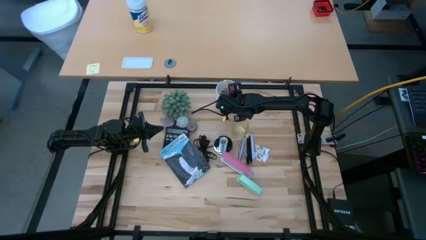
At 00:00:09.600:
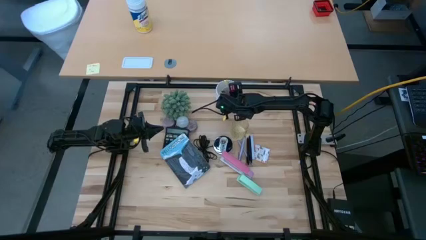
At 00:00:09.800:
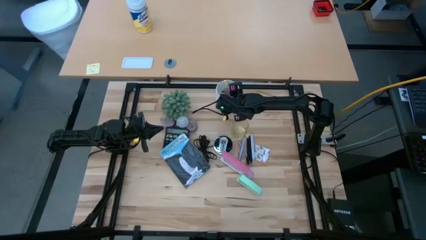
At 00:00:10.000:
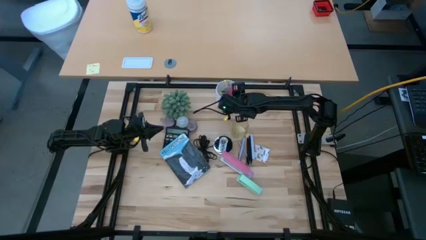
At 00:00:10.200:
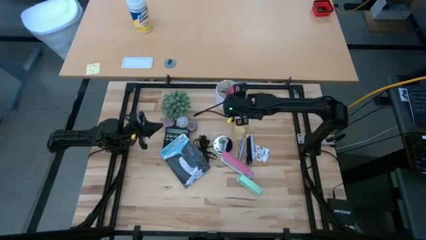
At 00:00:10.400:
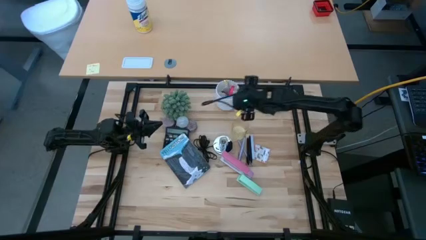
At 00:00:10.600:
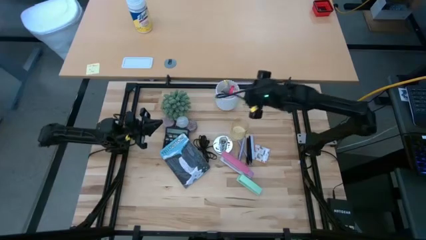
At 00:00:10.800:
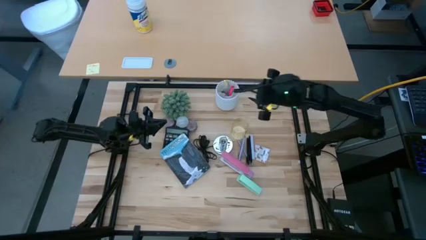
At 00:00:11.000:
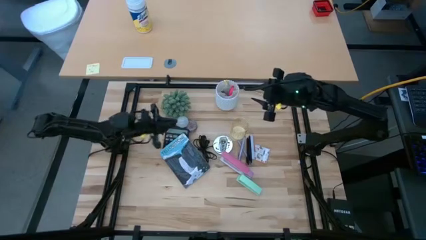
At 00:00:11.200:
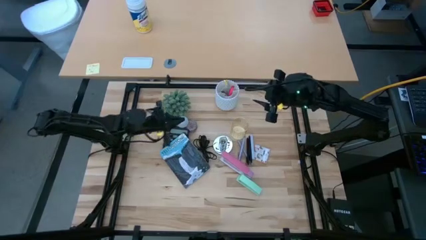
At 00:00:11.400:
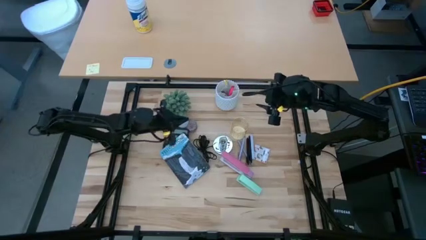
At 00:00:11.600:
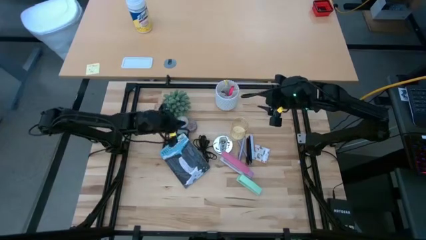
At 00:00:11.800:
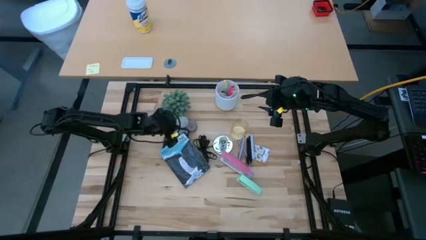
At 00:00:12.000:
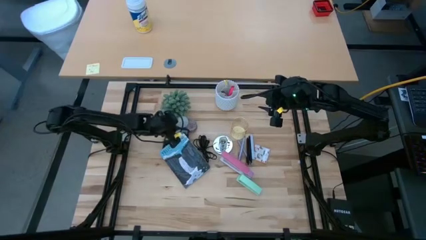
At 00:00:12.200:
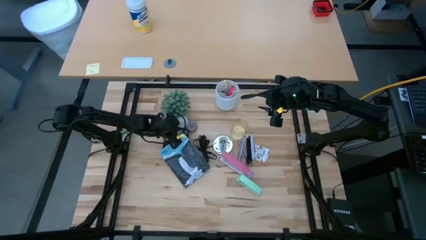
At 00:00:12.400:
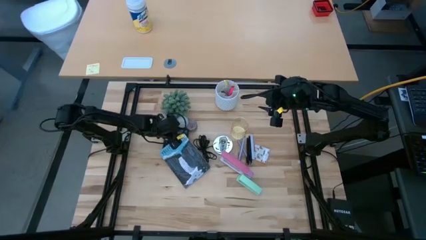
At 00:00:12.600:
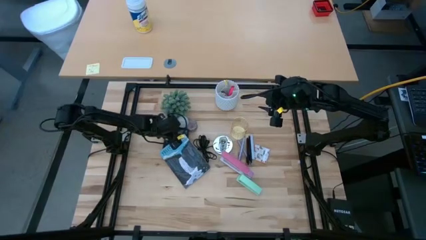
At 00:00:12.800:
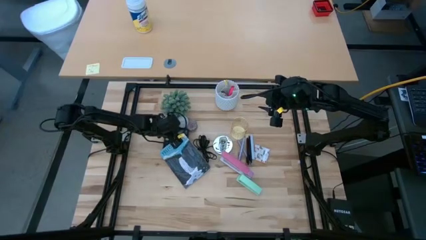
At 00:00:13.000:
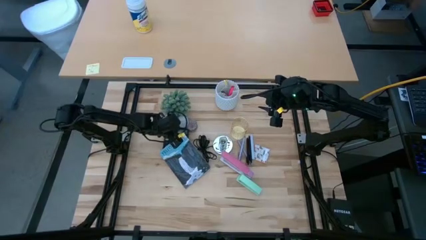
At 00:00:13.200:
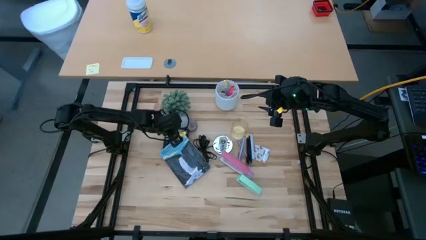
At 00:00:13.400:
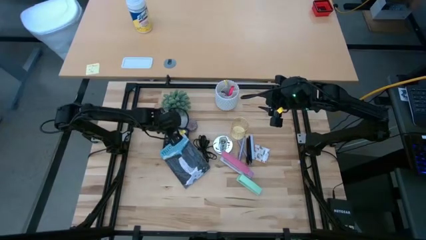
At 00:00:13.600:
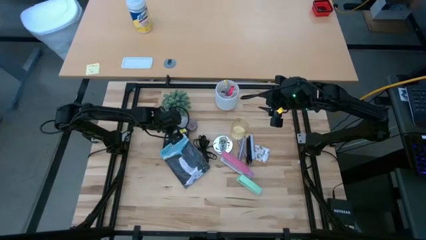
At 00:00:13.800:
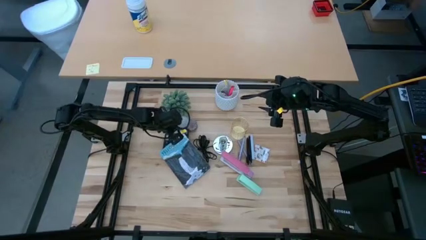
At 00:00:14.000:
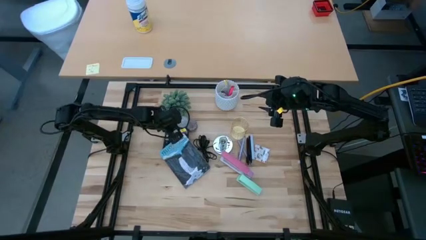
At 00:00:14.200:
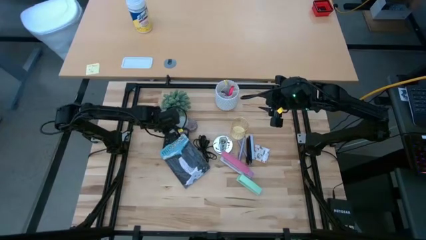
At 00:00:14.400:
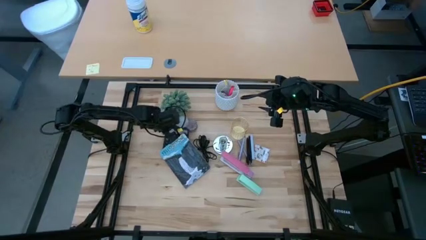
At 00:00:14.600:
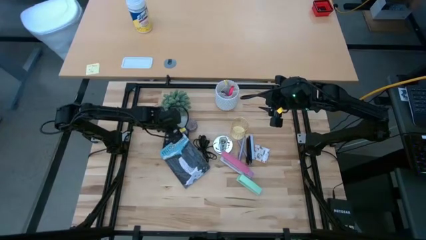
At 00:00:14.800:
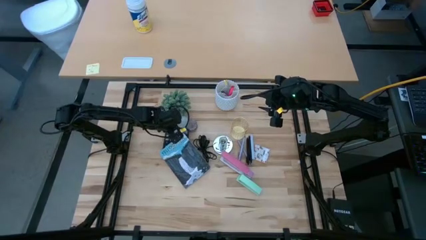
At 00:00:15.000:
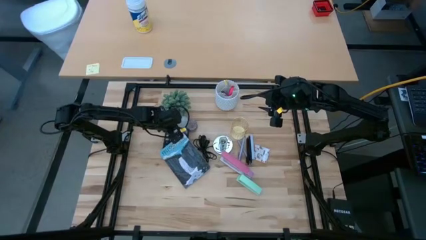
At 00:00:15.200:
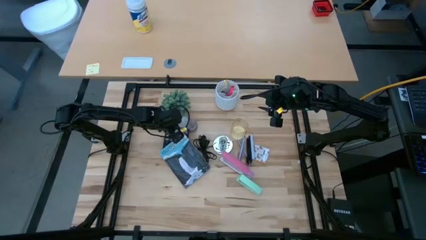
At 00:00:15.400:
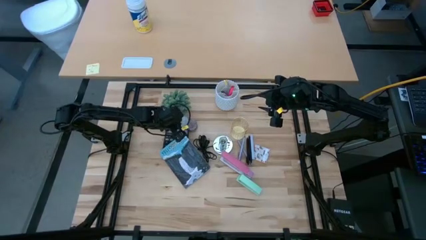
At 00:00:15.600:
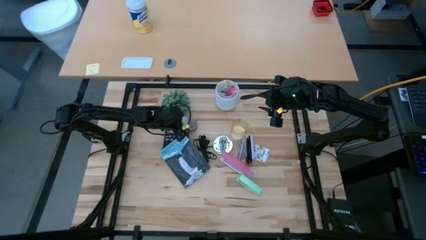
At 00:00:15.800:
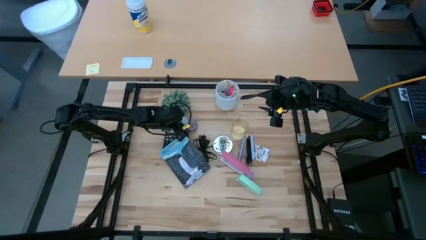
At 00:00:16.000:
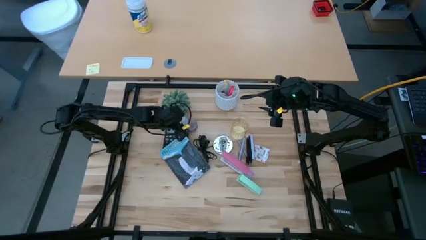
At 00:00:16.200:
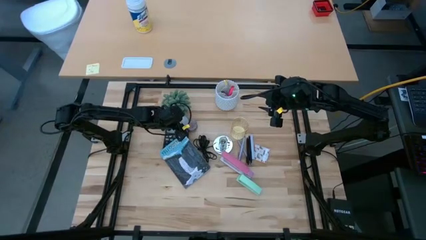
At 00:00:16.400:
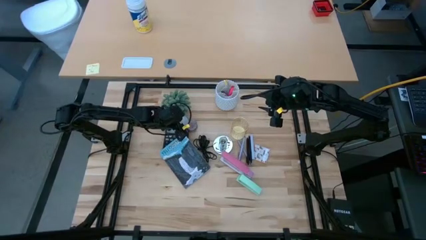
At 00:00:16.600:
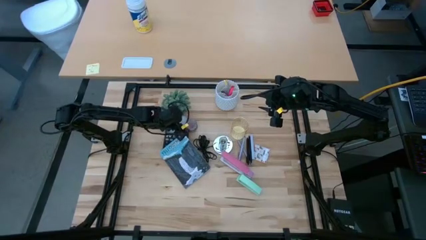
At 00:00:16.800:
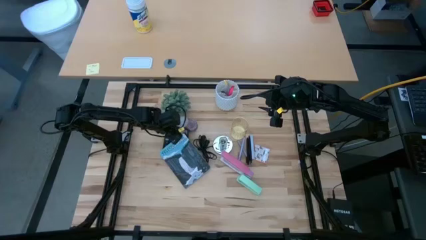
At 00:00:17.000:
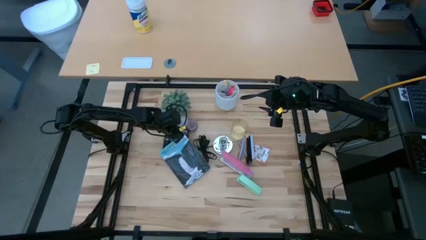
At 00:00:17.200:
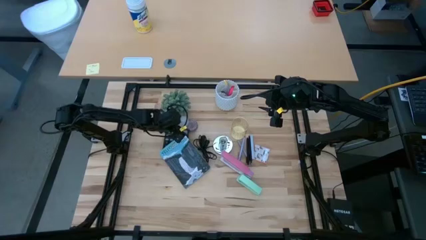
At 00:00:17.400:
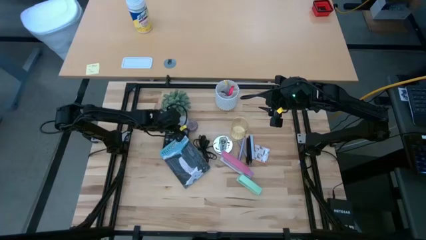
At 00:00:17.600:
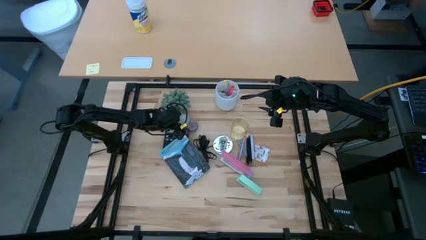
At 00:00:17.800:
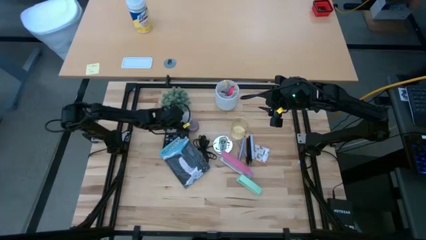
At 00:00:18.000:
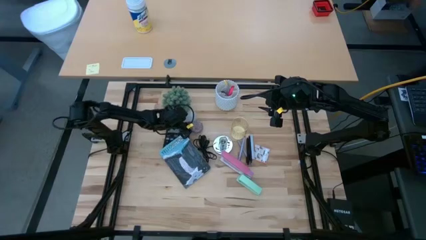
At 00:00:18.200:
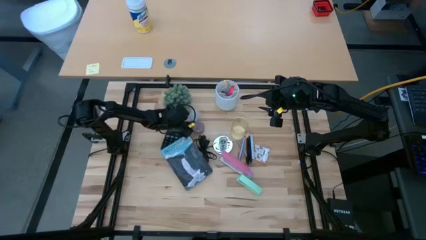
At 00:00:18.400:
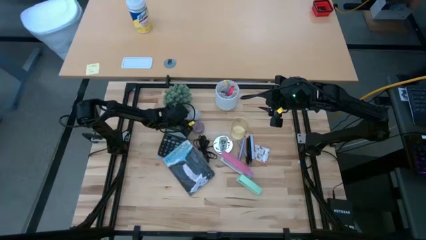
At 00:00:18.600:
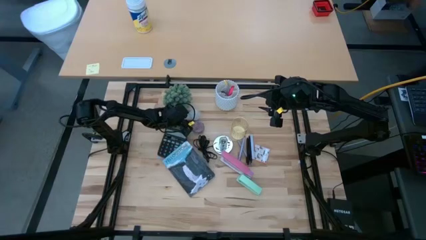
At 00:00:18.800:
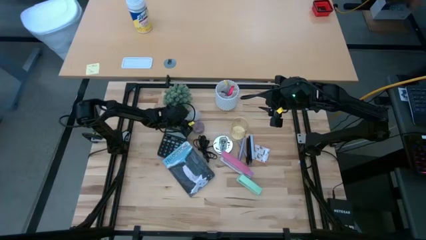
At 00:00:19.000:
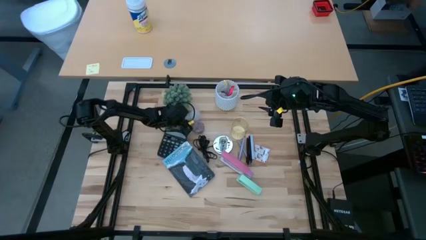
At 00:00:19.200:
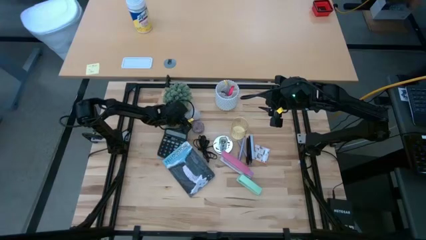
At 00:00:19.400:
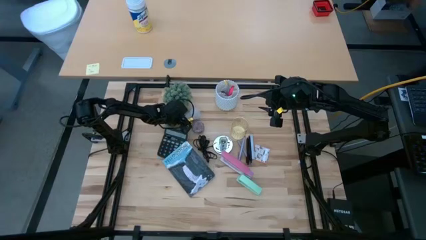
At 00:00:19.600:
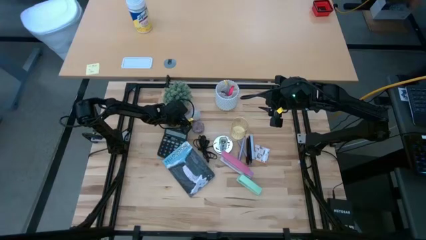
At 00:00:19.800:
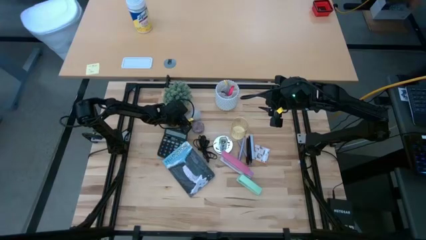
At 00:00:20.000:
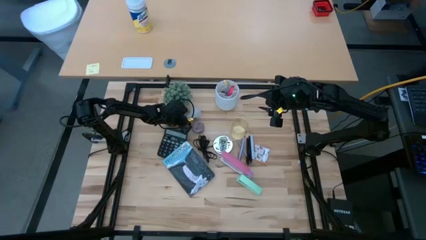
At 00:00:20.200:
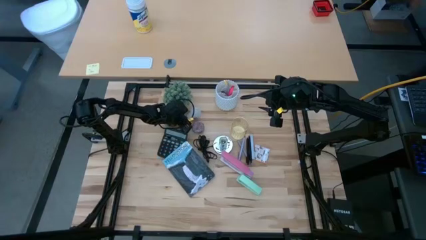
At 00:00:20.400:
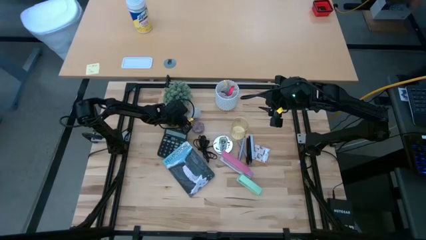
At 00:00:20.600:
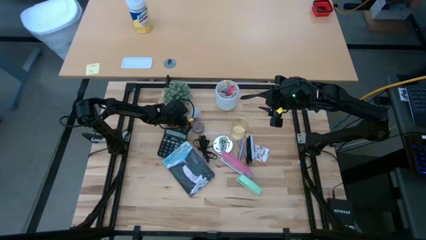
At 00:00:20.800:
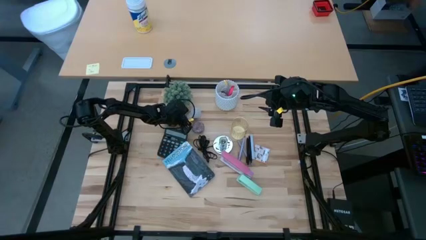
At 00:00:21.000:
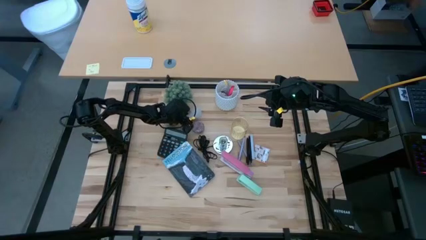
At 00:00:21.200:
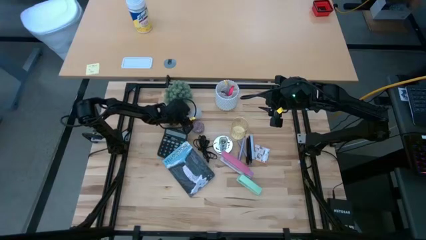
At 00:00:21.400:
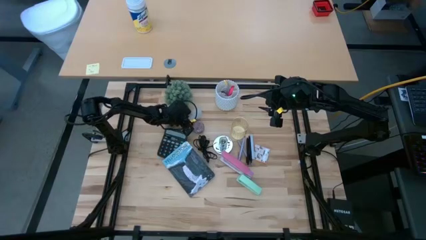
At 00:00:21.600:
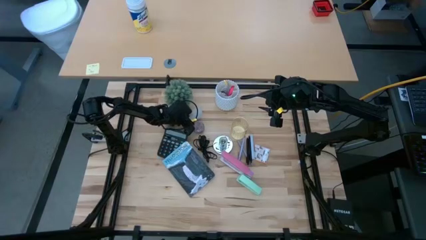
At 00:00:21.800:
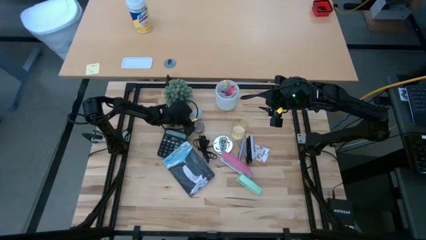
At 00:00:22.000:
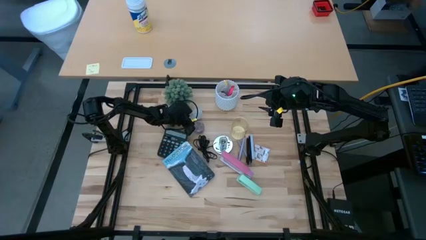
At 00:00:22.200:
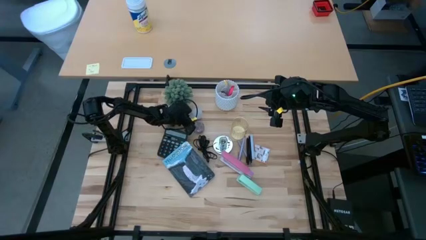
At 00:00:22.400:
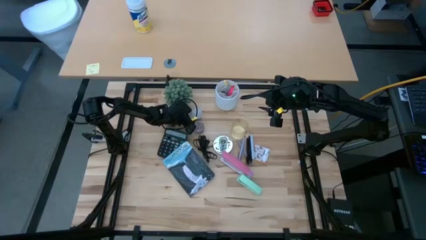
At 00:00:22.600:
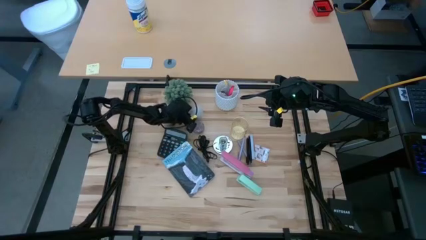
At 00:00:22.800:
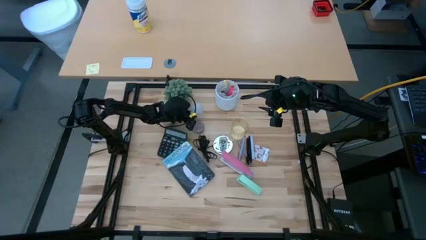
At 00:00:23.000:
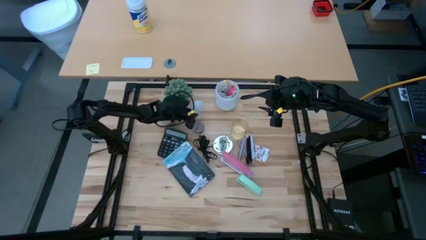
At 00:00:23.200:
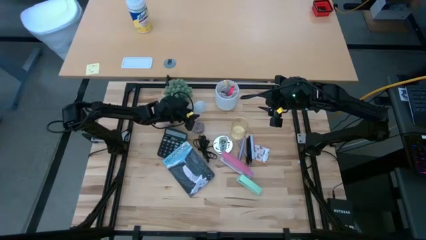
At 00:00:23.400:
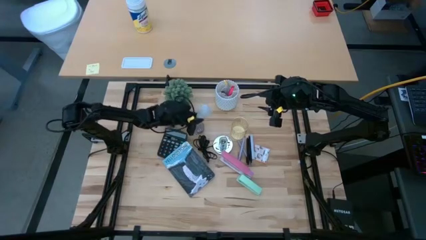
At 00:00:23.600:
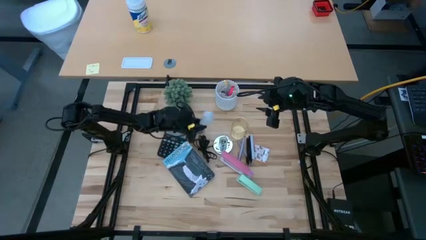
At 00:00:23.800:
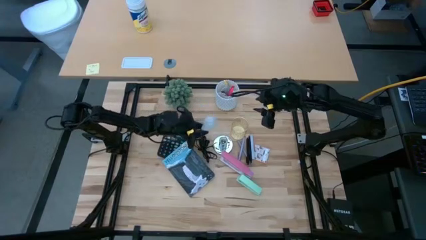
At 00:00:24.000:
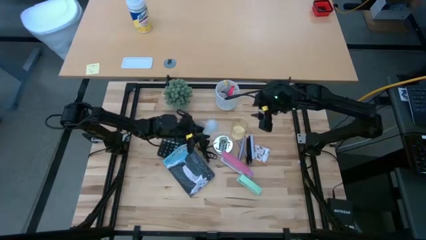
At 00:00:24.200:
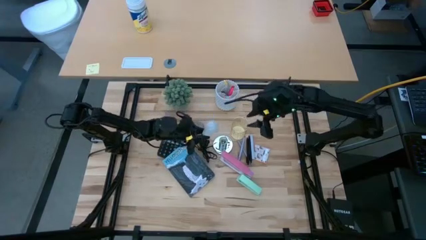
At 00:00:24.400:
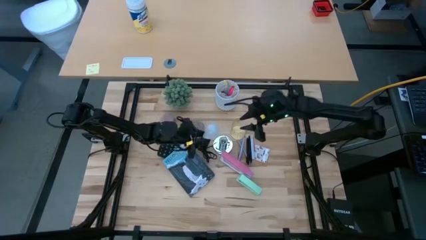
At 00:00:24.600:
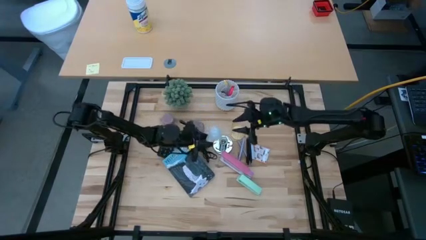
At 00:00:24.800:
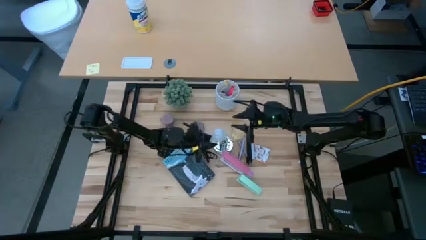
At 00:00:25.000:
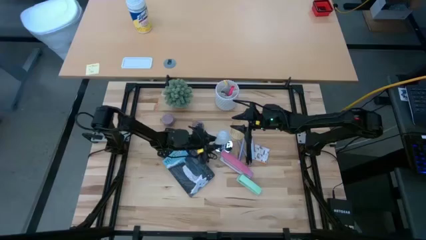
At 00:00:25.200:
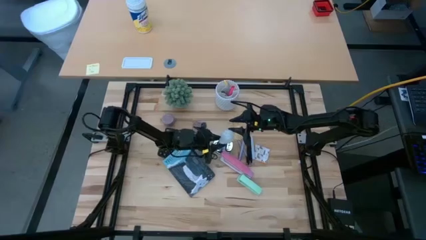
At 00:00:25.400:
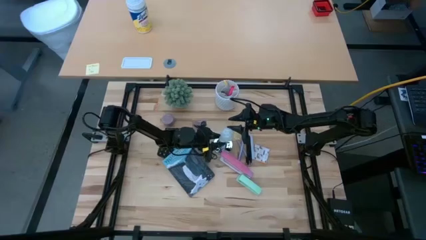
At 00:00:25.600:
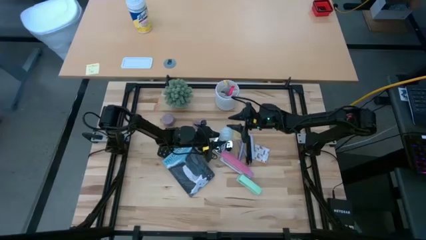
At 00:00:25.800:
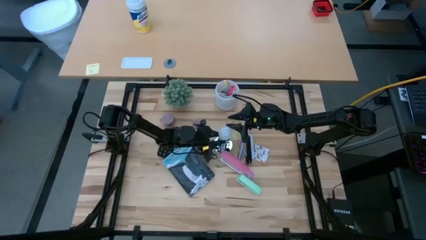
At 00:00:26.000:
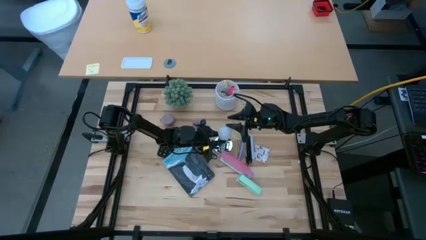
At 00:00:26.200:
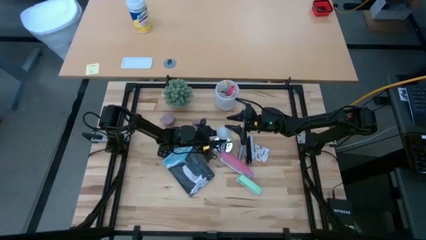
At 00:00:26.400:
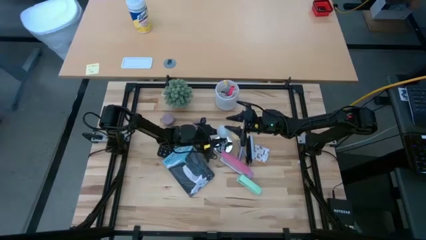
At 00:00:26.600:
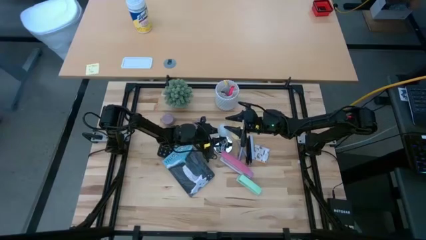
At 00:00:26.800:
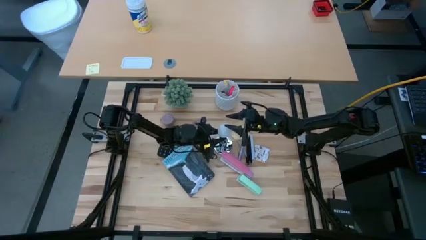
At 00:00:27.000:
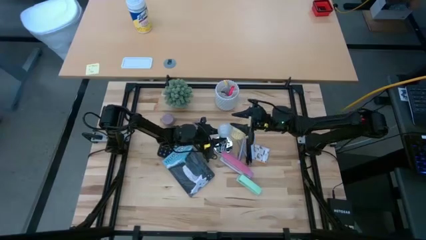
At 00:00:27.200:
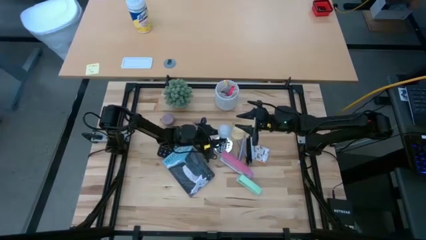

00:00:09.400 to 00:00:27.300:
Task: Screw lightbulb
Insert the white lightbulb into the silver lamp
